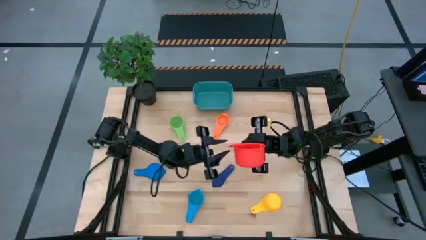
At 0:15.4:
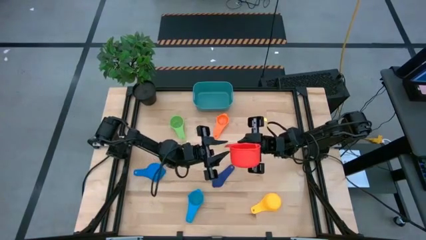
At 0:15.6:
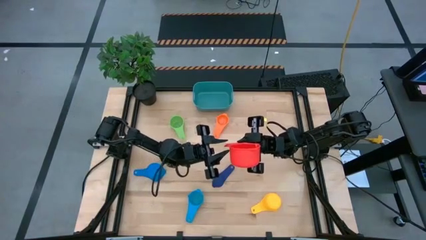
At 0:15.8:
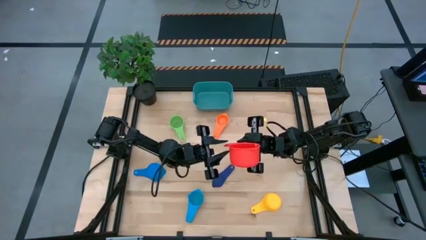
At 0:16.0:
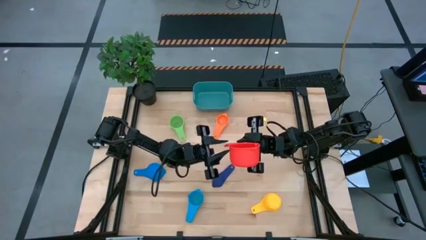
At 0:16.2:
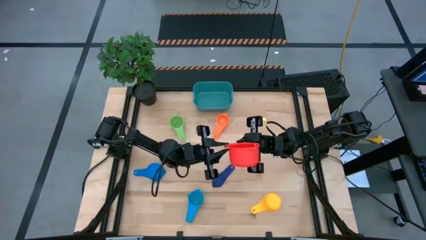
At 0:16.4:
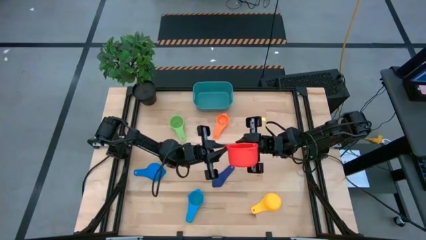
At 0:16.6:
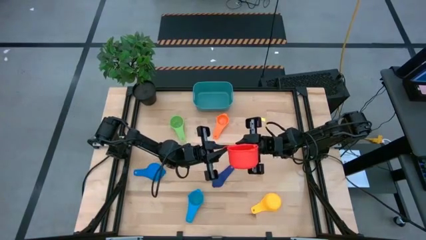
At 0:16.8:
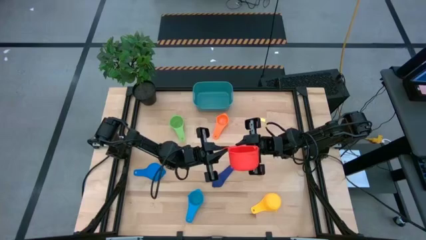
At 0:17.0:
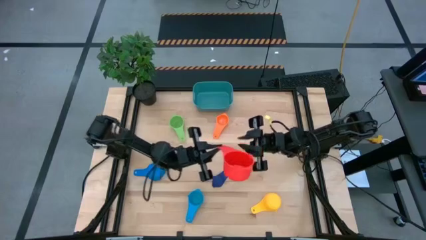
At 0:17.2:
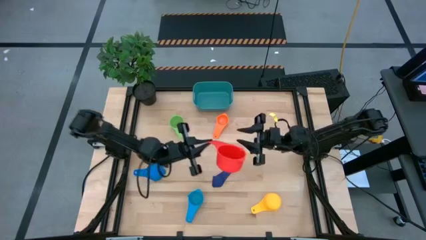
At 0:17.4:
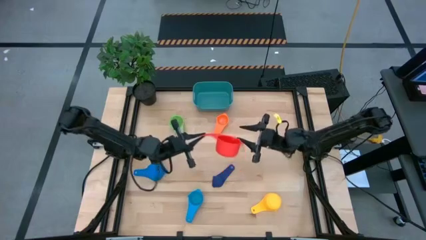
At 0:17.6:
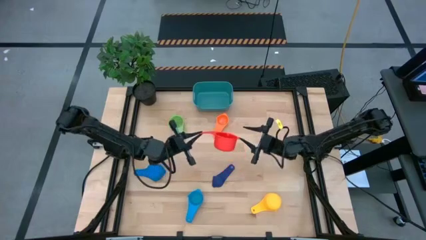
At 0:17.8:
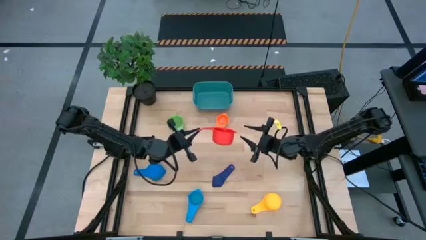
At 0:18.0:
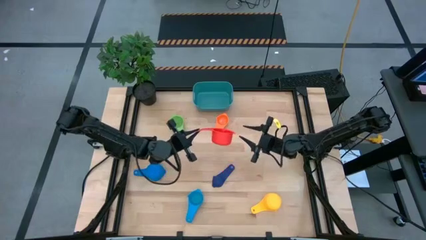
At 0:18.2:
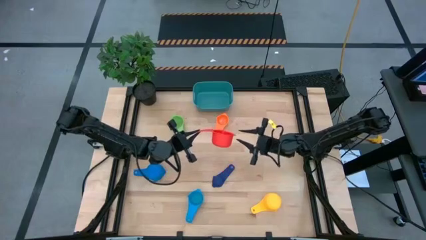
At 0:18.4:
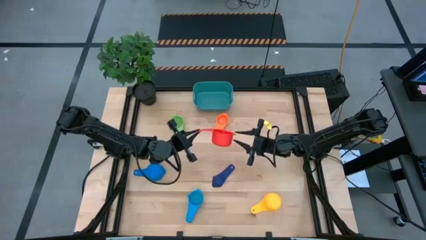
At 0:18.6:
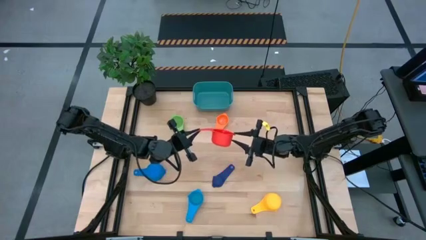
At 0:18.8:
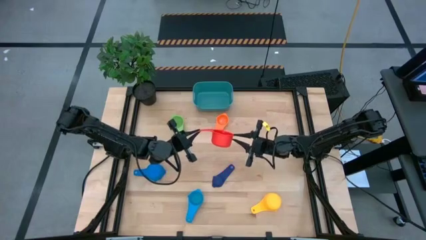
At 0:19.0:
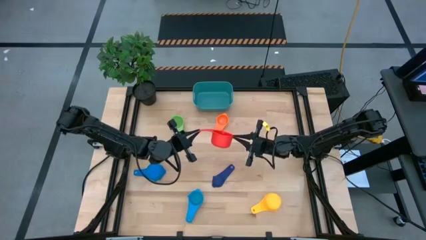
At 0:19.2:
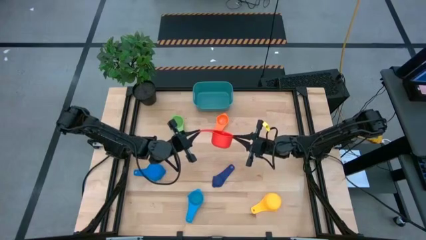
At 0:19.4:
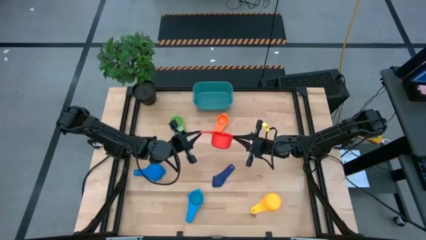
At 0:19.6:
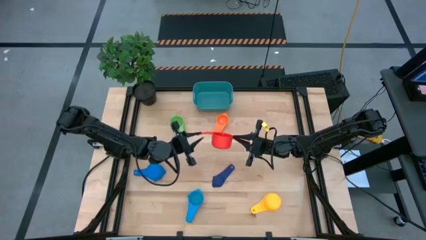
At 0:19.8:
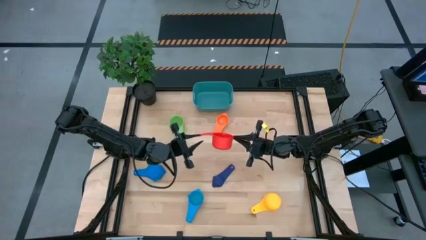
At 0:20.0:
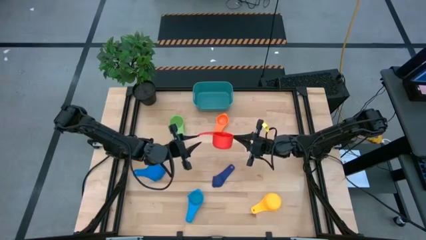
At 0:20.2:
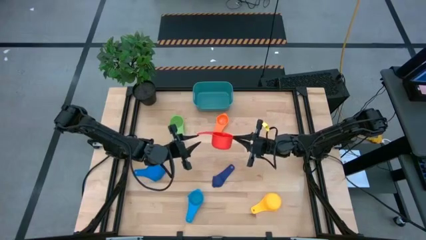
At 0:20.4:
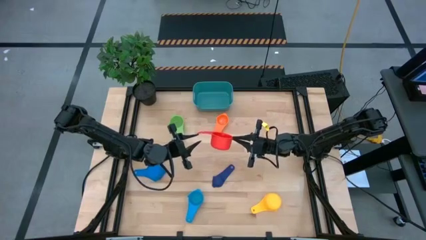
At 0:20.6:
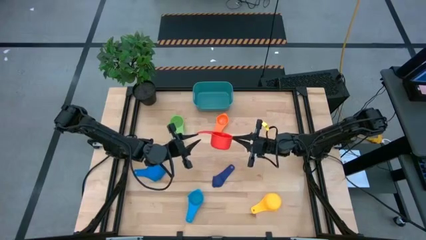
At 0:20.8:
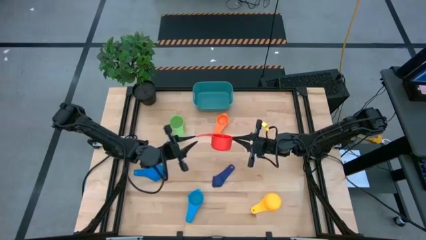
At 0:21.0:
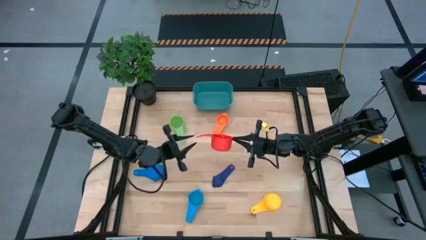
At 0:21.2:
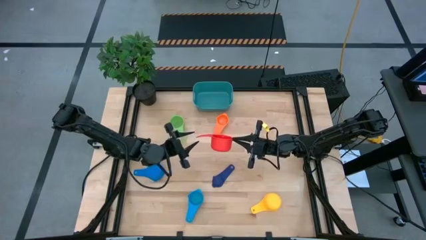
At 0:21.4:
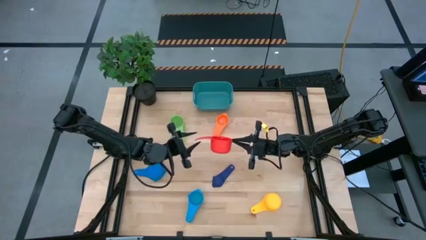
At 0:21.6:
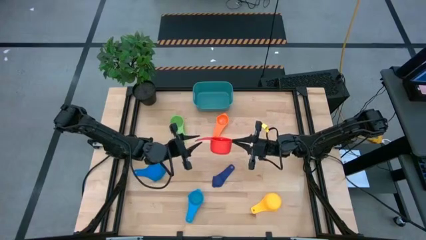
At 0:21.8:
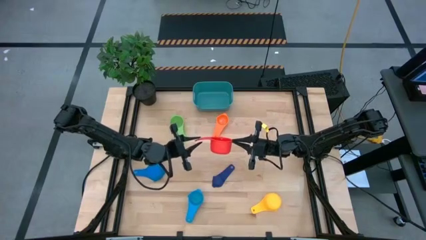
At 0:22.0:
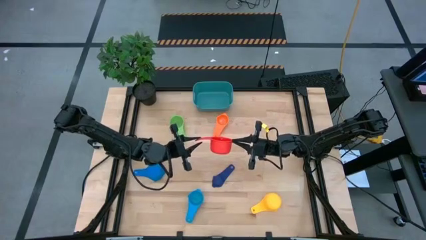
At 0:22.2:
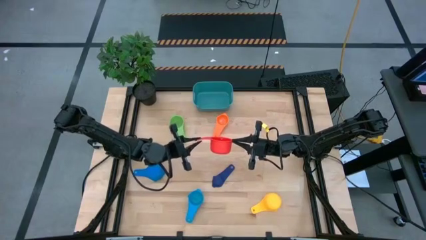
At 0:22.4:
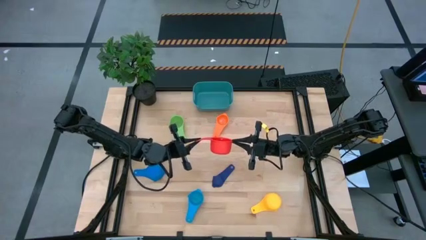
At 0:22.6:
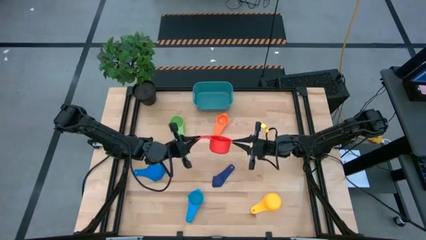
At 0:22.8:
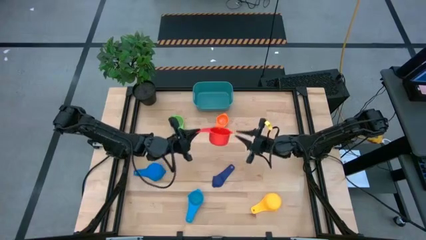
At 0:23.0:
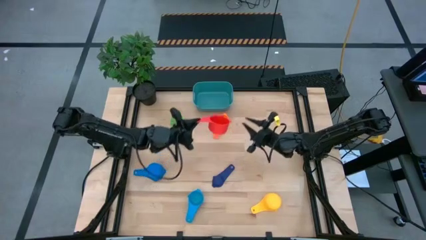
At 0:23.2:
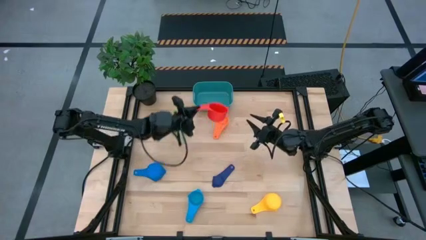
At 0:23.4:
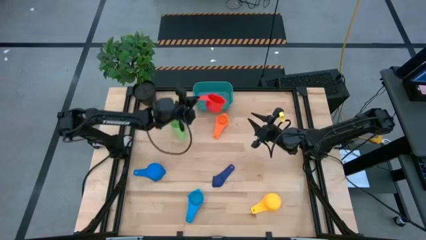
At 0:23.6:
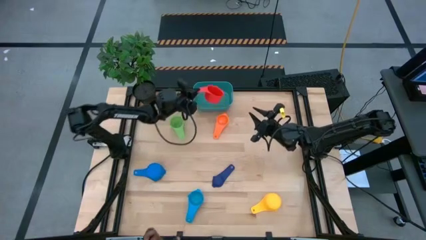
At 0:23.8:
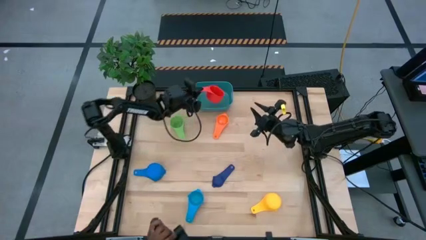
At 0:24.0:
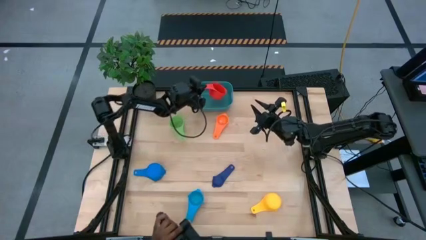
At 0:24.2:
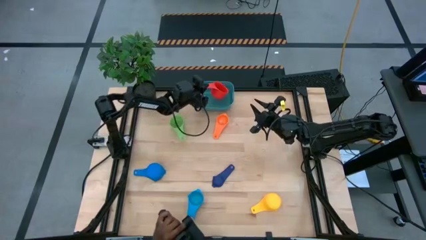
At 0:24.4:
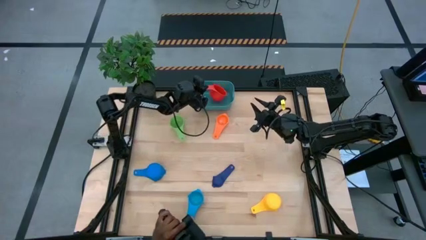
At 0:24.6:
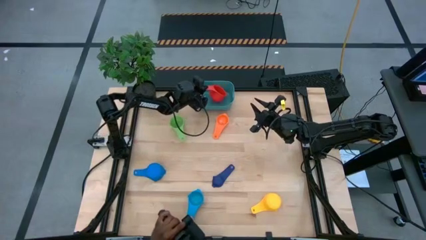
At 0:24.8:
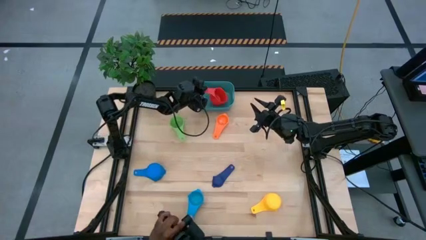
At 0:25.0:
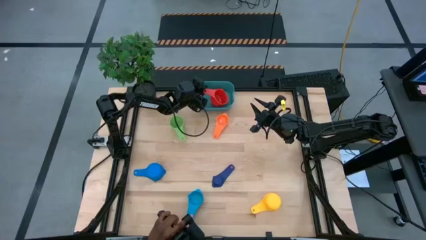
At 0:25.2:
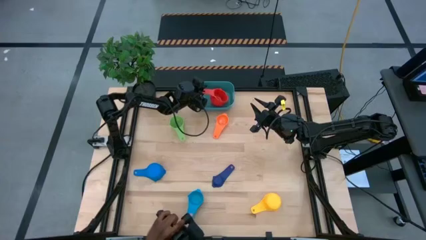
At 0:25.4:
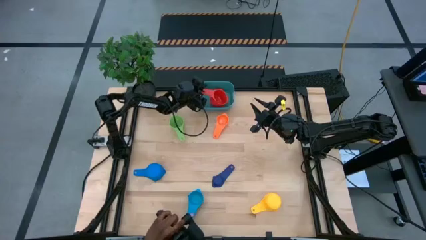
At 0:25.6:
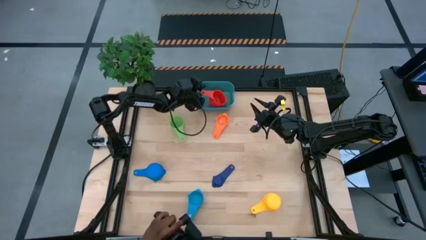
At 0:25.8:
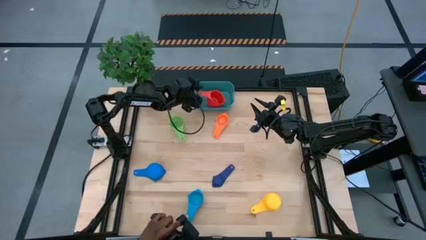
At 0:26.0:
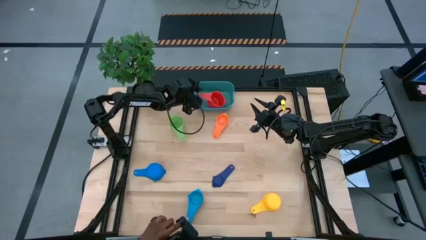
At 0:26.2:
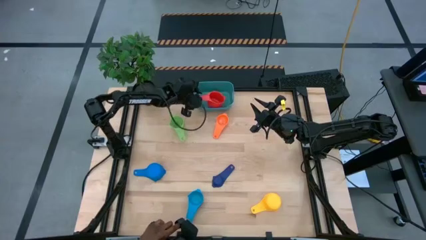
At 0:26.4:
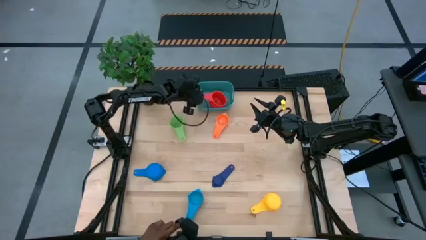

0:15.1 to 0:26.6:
Task: Nest measuring cups in basket
Put the red measuring cup into the blue bin
